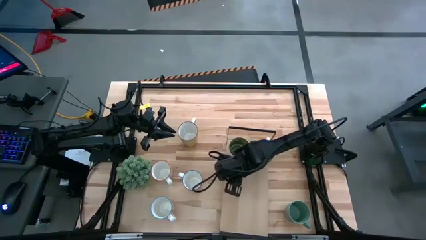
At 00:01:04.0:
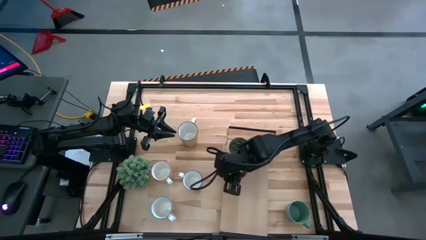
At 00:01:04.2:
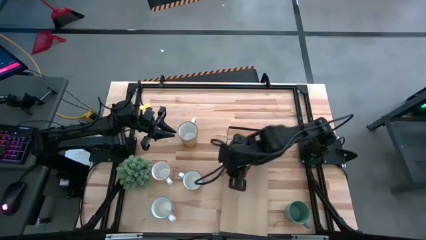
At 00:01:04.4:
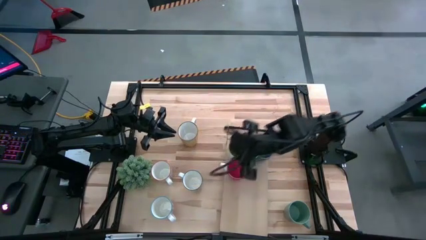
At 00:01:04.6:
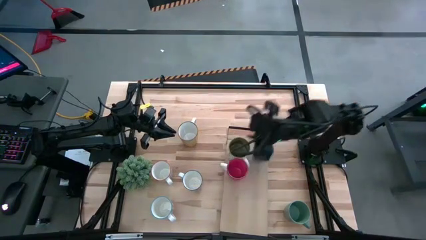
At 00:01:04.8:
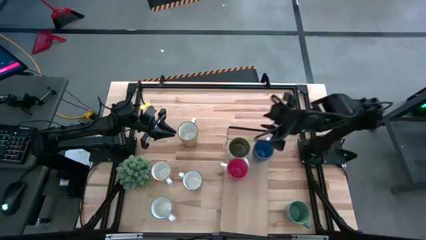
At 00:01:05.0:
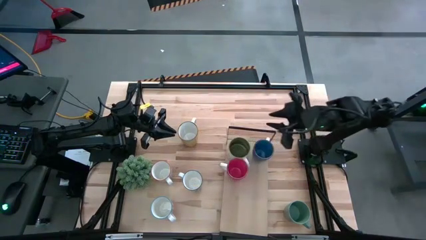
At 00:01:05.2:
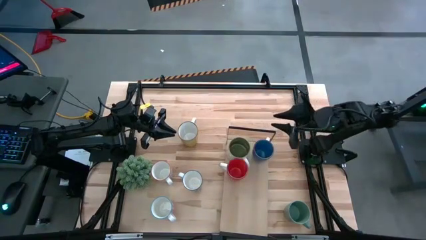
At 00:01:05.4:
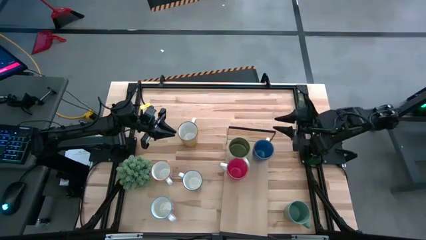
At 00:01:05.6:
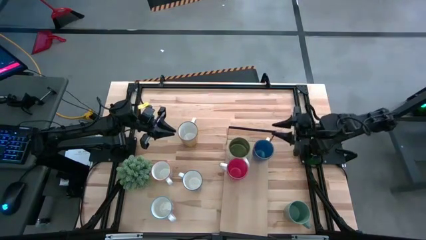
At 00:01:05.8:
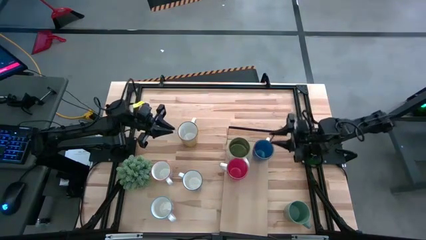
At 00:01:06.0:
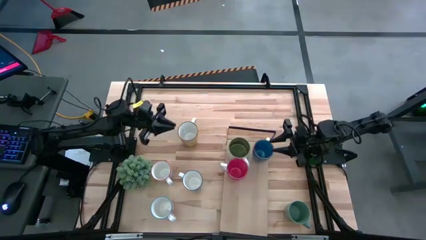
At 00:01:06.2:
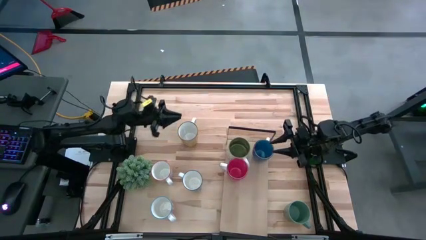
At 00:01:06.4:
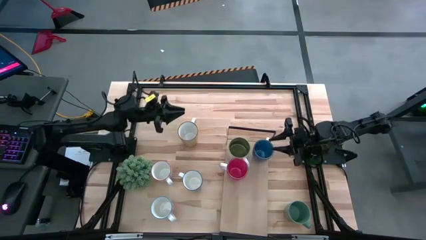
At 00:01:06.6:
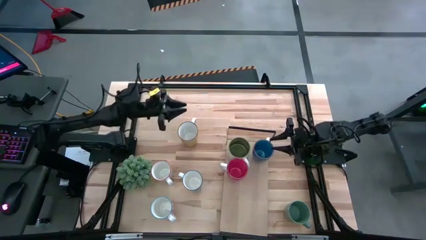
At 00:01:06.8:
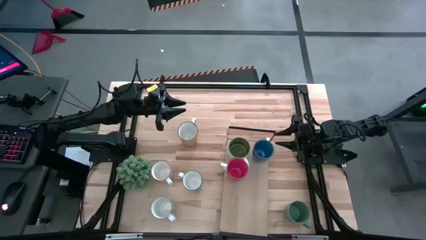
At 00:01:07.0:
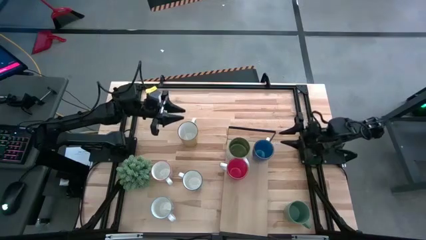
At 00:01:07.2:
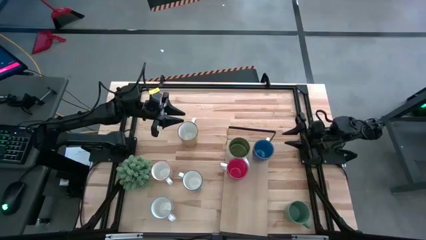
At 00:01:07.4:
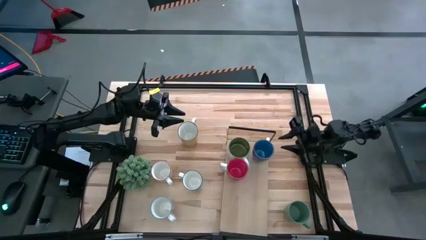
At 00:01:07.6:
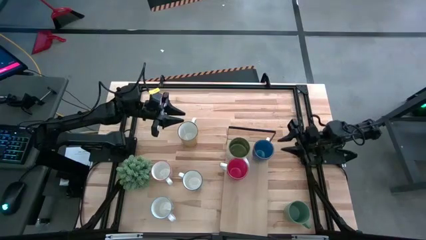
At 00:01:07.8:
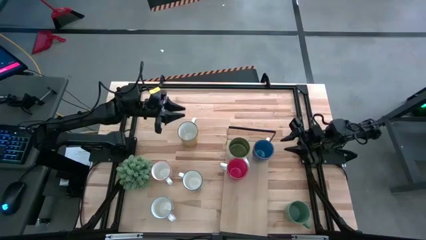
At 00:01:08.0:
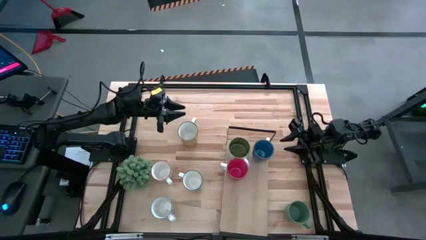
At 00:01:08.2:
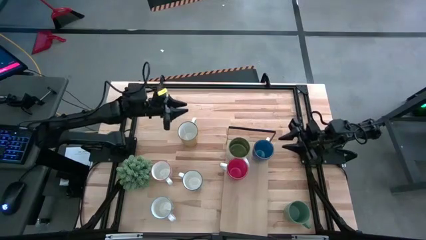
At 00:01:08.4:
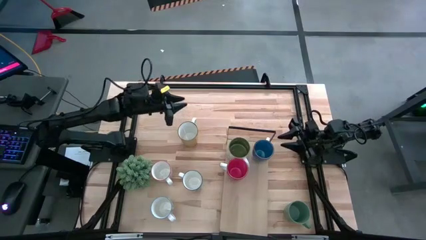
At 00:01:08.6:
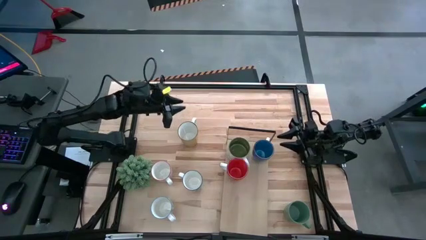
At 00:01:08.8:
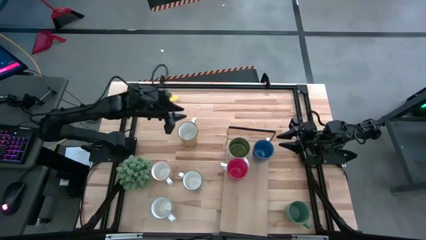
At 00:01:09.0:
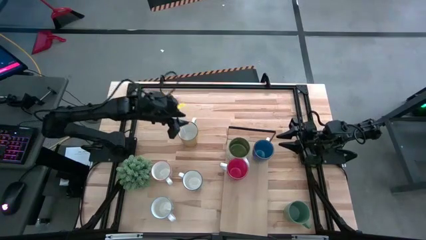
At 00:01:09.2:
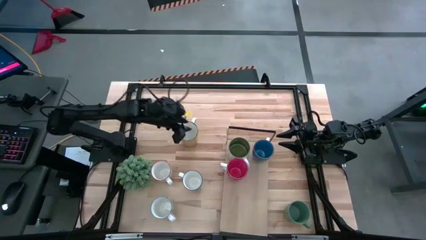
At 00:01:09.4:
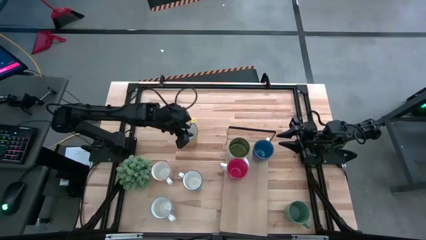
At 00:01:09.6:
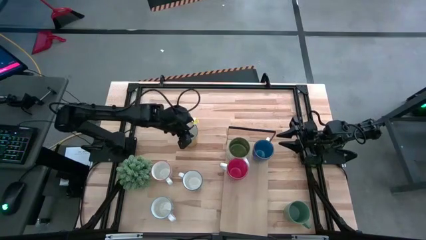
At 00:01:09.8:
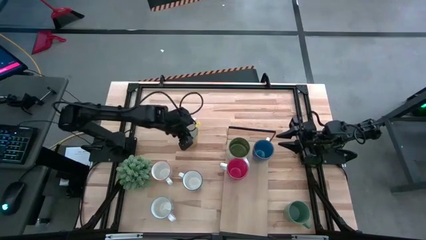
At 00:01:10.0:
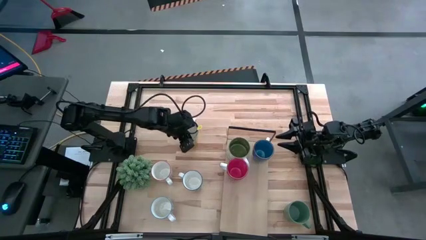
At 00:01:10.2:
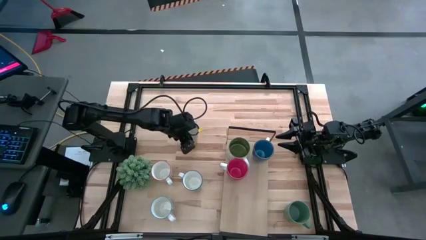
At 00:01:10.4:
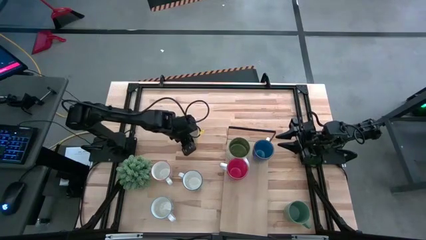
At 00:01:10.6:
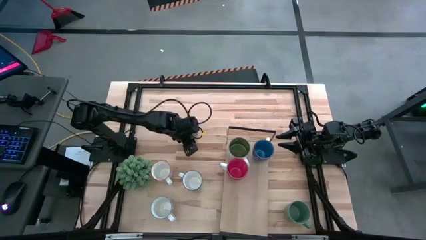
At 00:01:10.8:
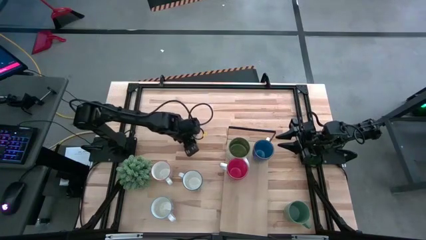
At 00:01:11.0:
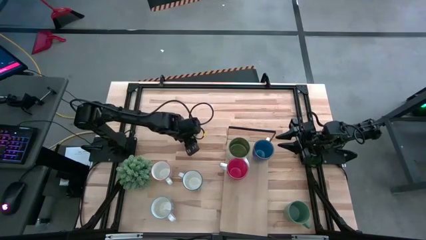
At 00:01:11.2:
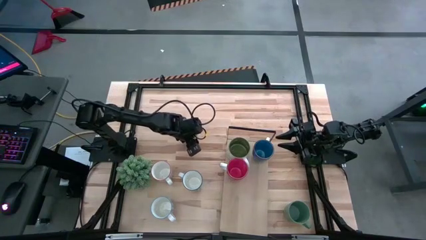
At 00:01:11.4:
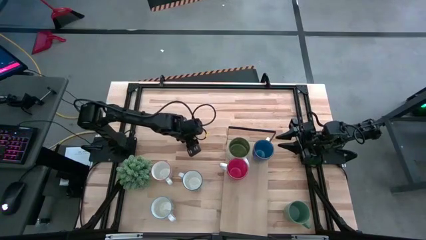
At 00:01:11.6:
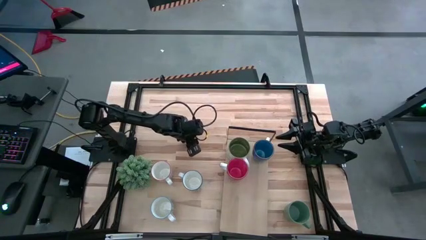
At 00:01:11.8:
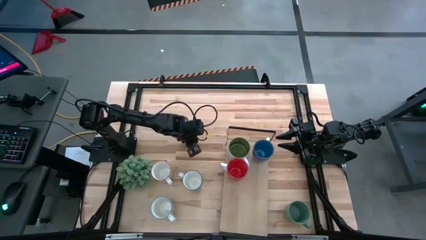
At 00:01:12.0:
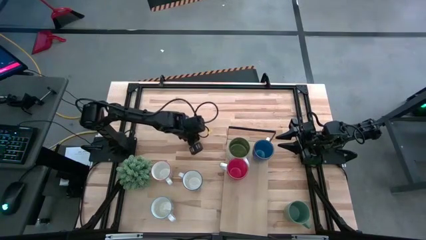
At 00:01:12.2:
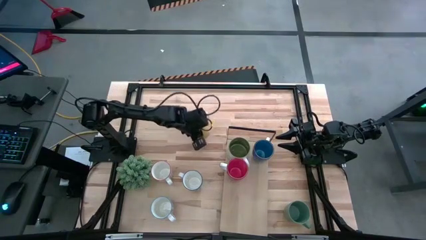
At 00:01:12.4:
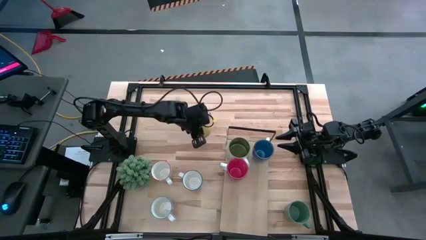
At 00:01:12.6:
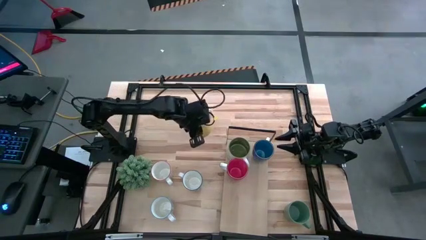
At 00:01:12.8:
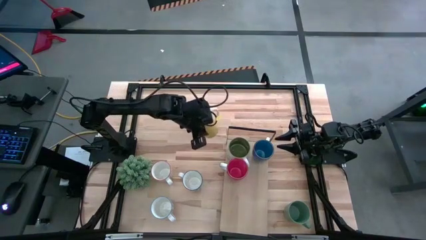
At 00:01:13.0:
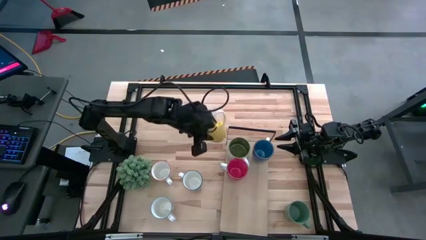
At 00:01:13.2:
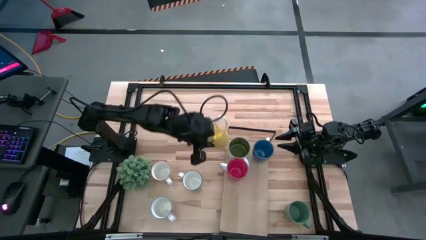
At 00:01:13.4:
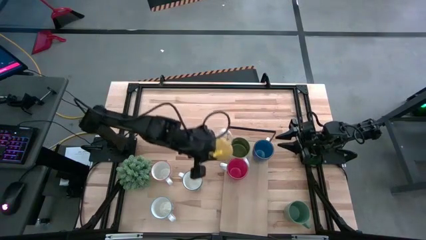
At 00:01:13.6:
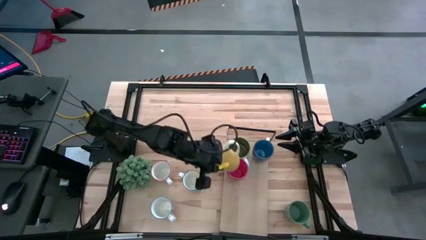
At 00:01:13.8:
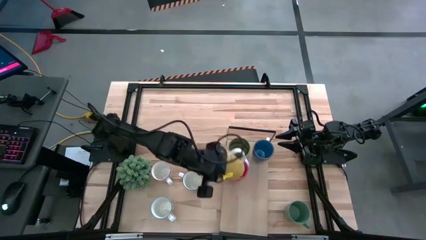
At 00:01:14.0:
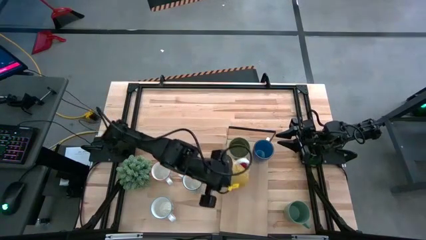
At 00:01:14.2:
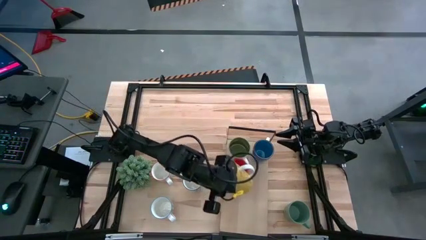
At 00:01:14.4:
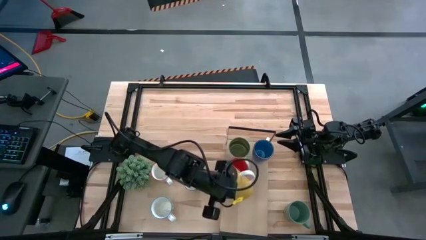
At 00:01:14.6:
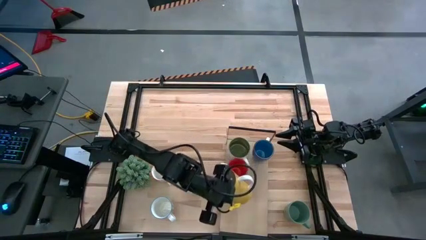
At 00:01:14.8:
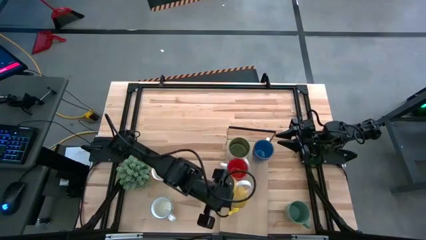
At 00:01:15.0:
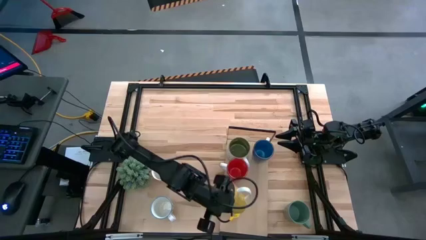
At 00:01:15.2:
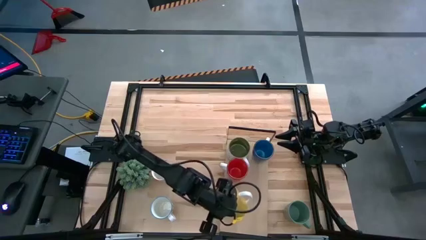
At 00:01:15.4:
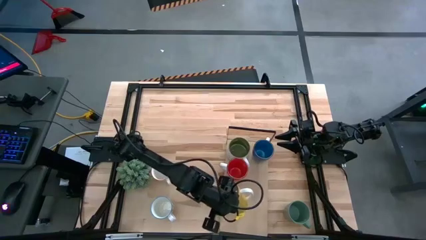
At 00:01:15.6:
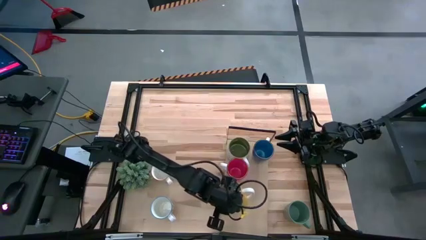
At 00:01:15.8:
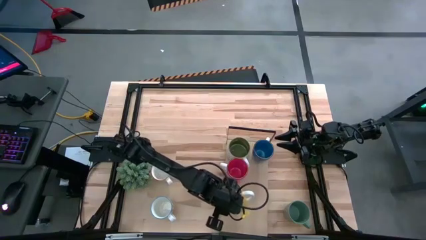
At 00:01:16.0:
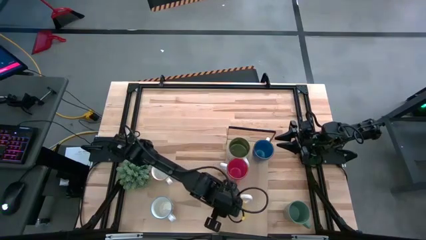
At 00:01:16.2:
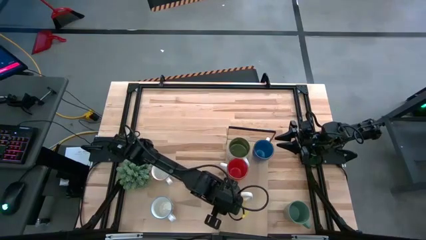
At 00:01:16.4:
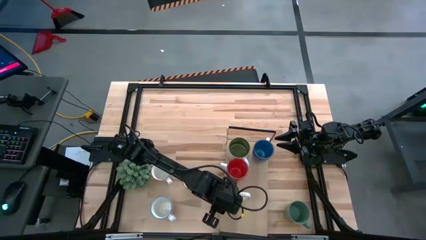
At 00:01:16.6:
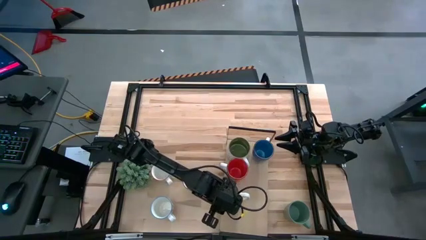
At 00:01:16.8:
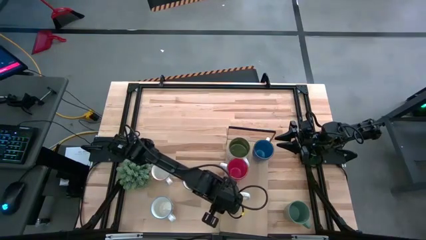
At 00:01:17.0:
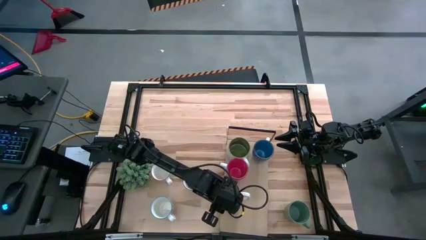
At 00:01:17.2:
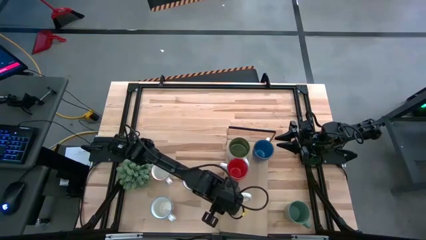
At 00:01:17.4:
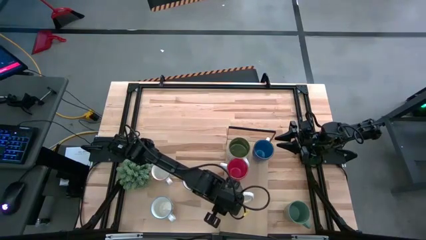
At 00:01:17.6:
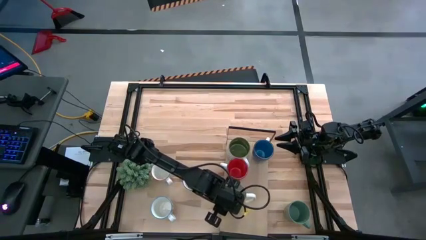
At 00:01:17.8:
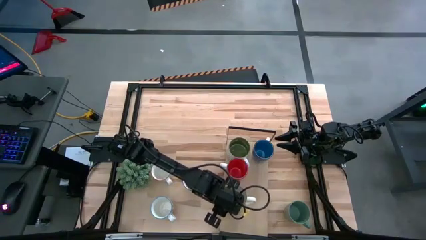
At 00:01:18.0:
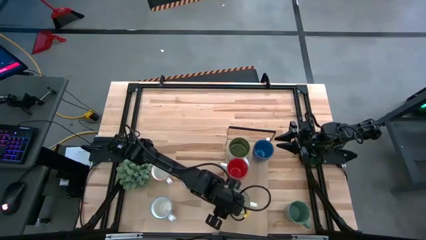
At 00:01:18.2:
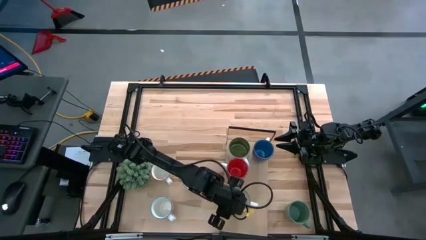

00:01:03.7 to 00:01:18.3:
Task: Place coffee mugs
Put the yellow mug on the shelf
